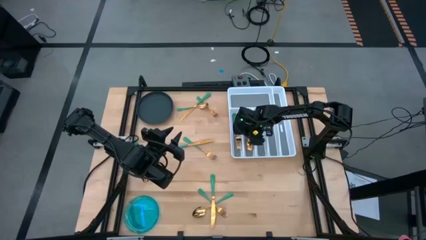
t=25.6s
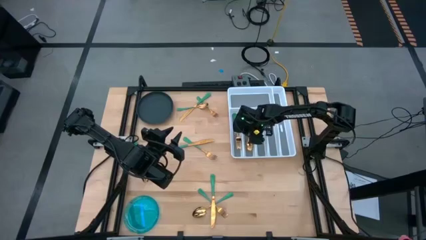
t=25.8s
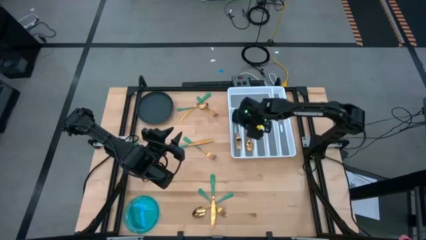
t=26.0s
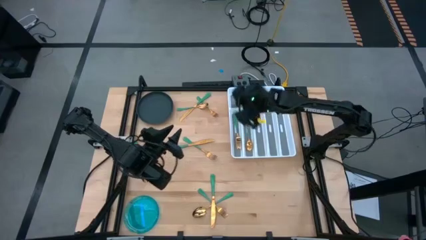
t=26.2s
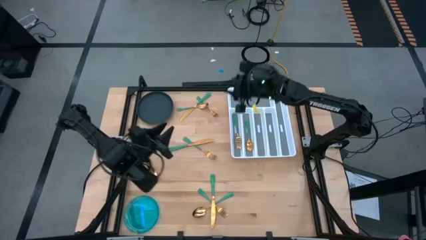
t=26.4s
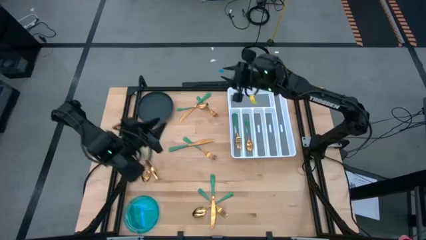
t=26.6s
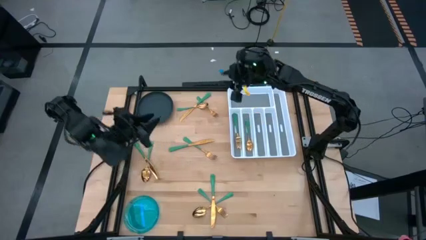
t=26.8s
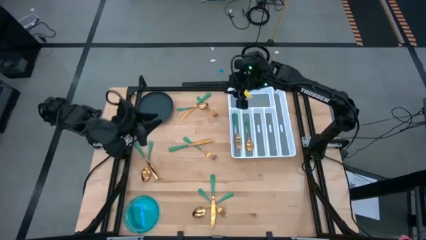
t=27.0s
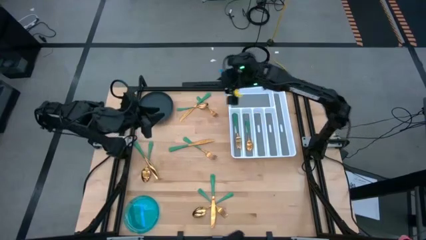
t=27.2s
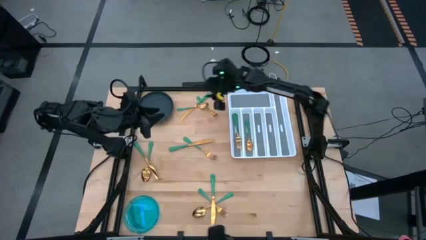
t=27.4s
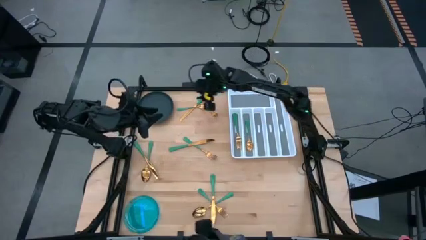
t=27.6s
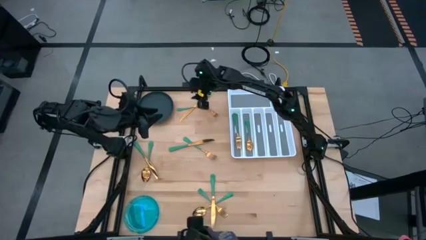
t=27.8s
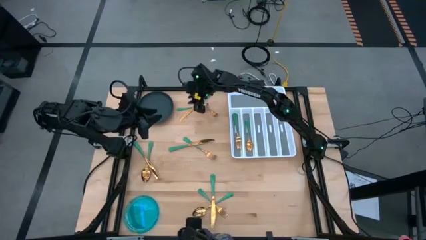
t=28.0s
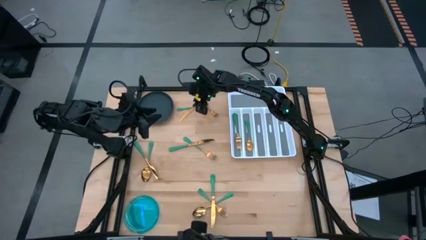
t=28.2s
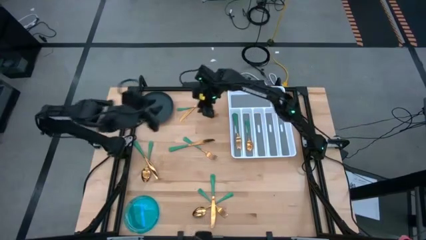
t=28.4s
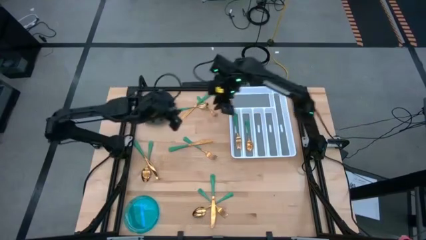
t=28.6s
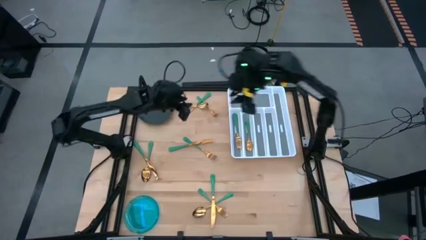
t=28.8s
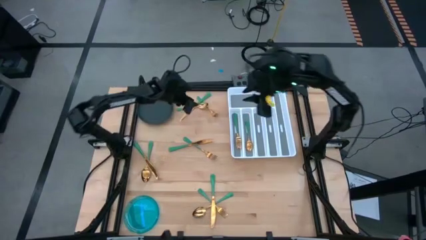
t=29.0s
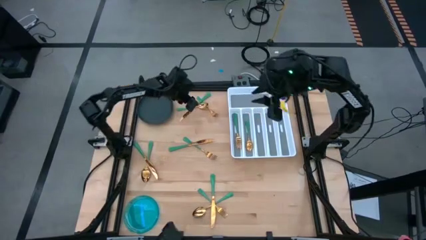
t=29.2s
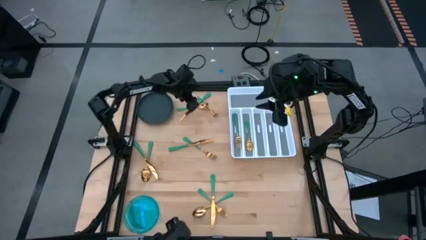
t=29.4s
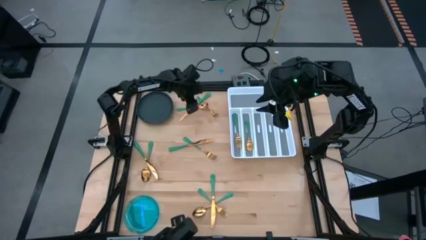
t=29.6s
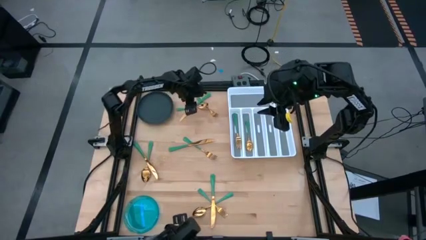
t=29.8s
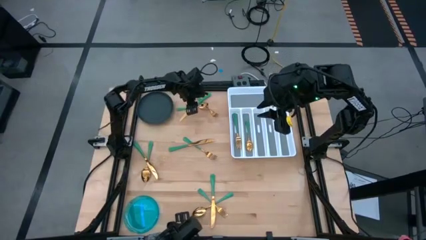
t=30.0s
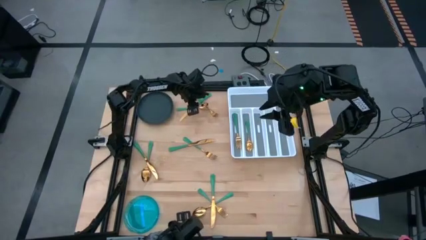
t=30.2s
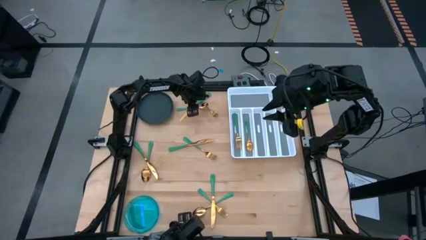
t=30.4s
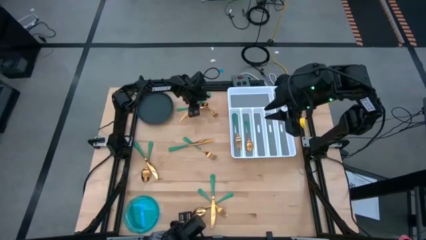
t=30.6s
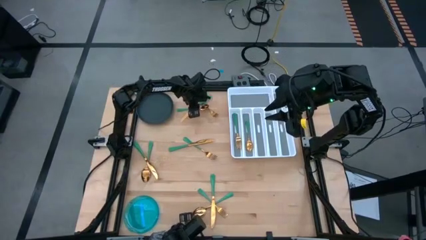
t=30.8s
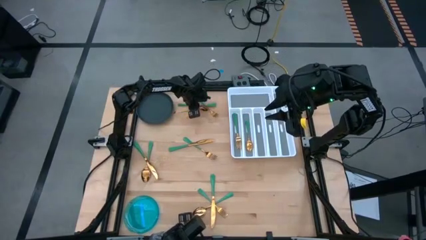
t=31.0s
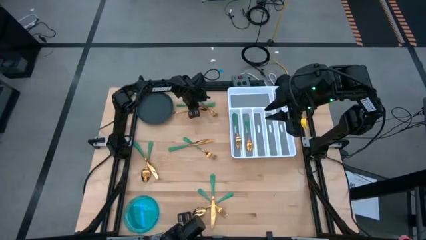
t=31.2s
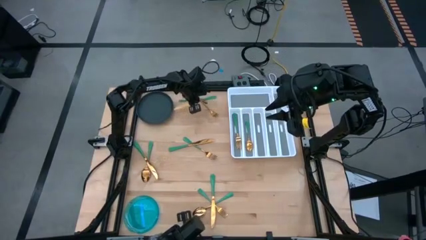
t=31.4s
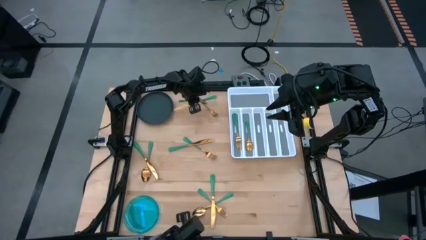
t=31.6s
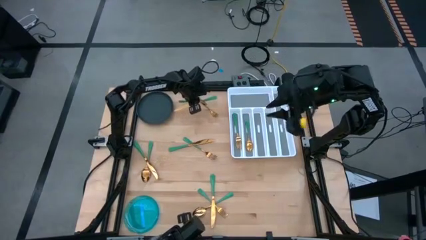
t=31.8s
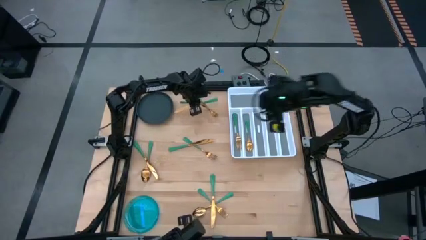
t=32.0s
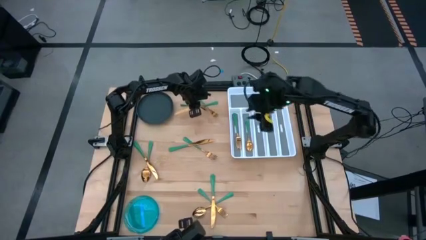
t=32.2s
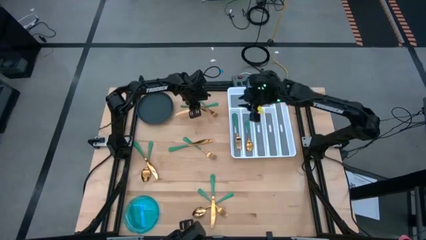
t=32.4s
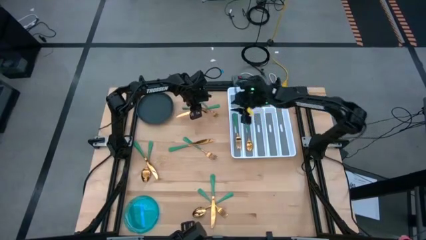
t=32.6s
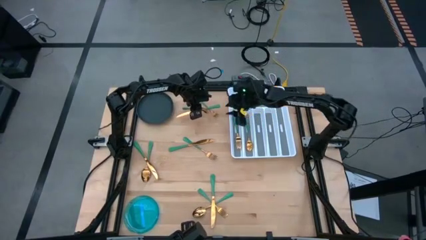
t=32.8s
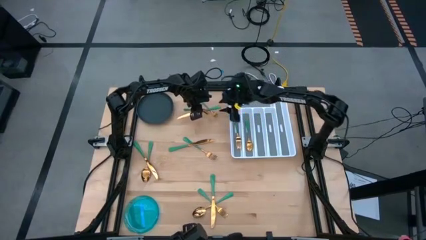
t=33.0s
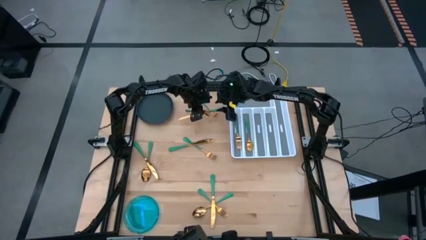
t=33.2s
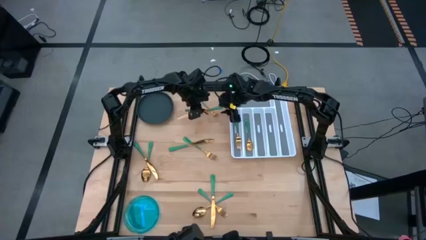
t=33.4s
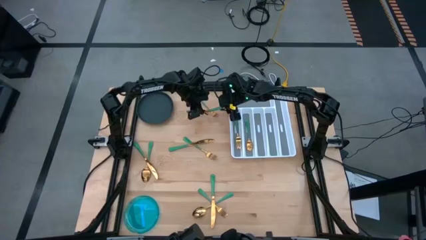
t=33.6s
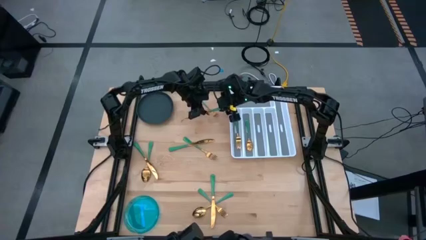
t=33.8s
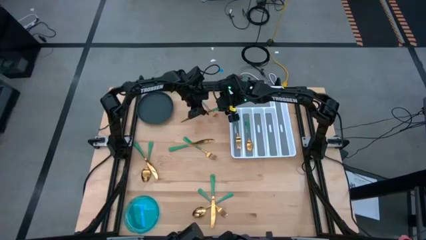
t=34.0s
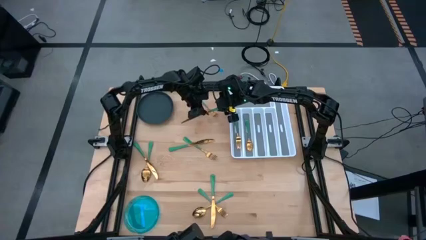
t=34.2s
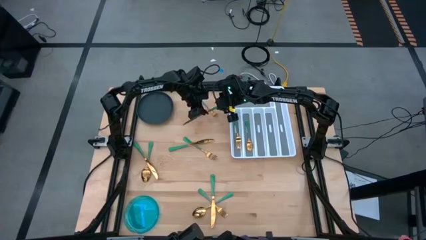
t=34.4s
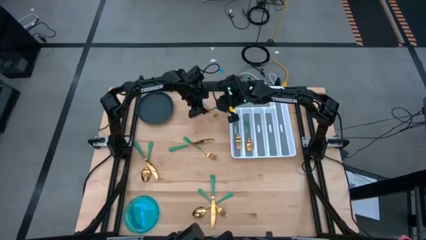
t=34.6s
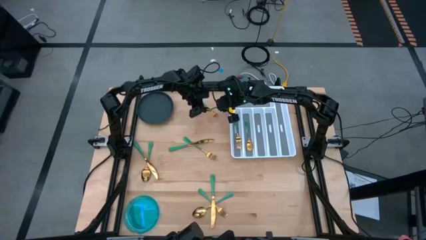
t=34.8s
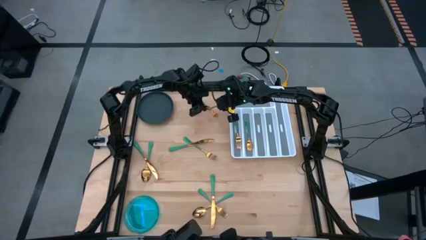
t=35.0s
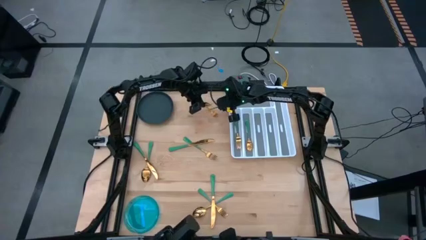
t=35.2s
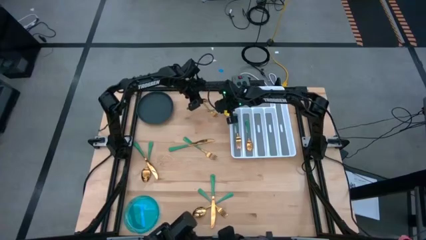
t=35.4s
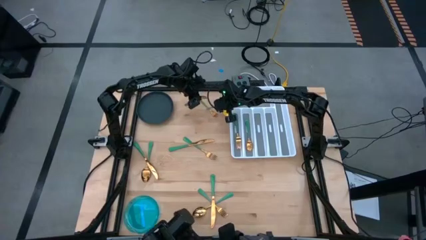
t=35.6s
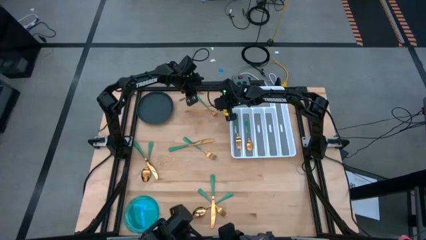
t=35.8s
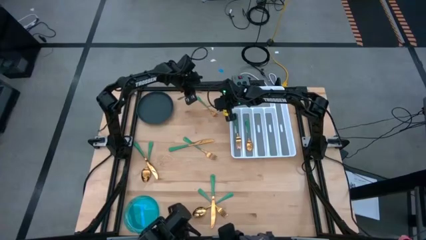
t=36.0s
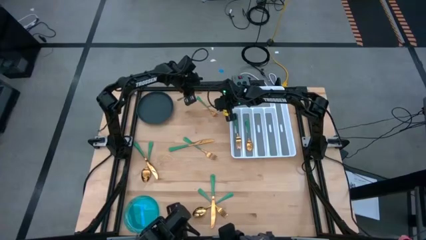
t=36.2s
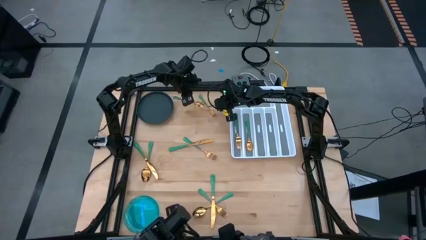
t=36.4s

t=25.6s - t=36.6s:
Task: Sort silverware
Put the green knife into the white silverware organizer

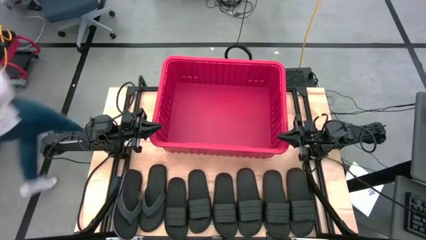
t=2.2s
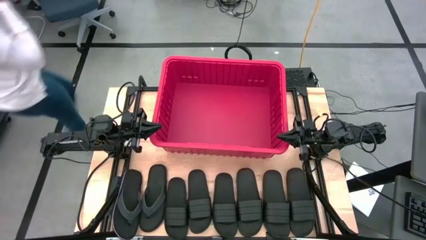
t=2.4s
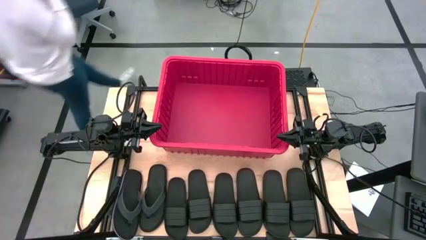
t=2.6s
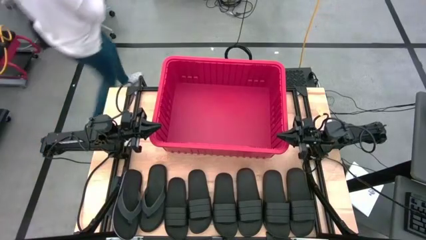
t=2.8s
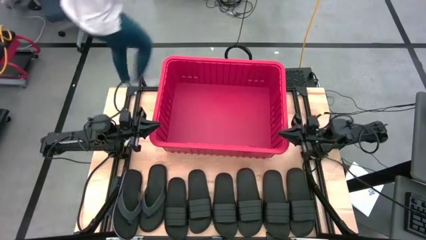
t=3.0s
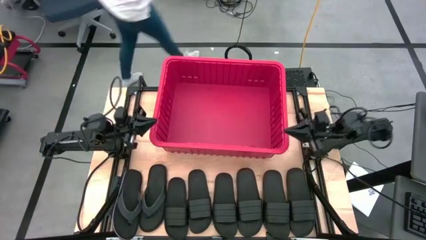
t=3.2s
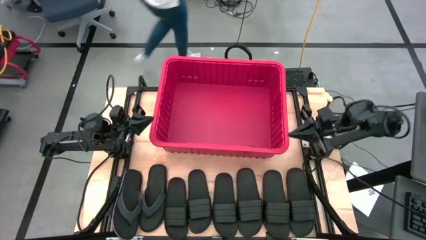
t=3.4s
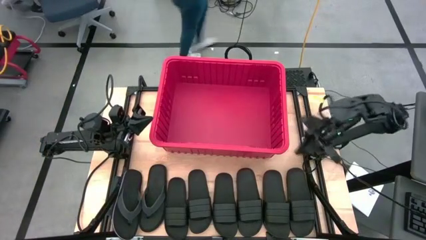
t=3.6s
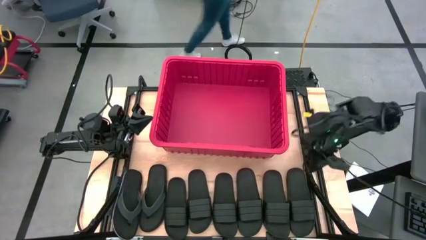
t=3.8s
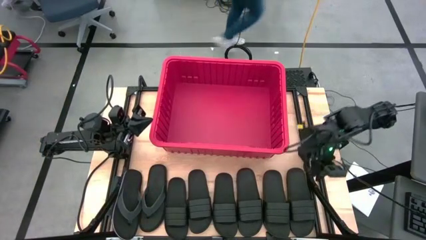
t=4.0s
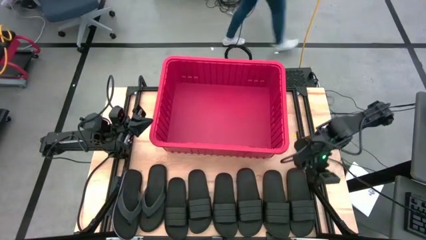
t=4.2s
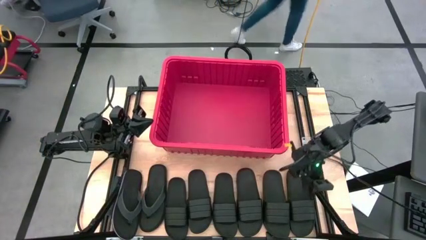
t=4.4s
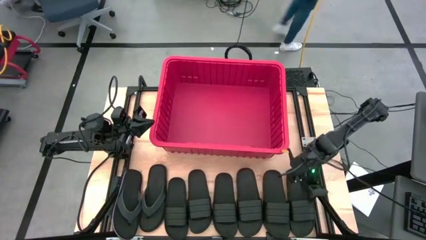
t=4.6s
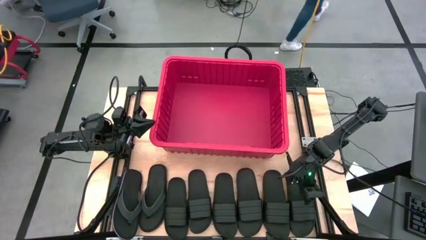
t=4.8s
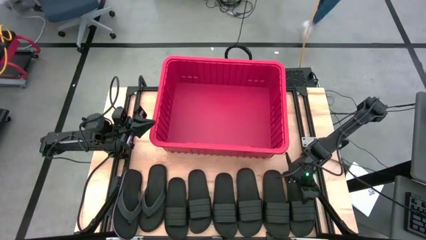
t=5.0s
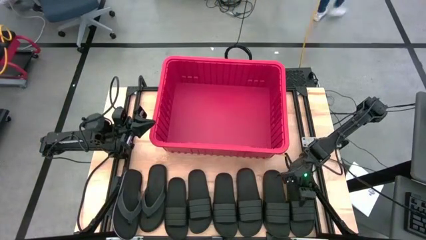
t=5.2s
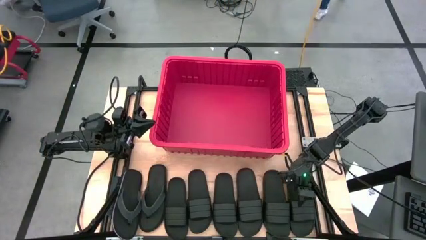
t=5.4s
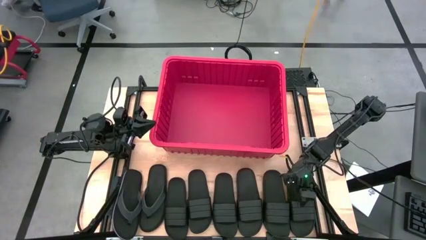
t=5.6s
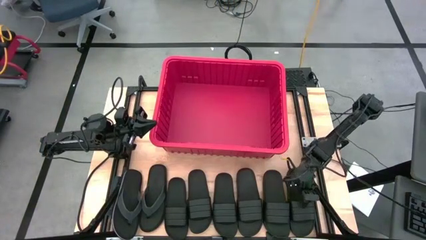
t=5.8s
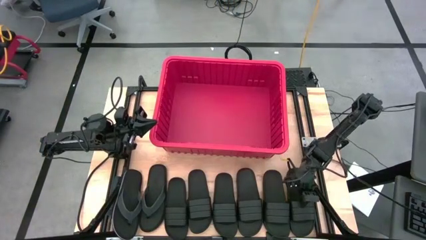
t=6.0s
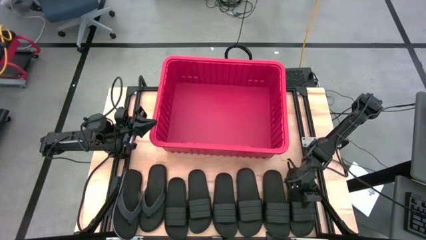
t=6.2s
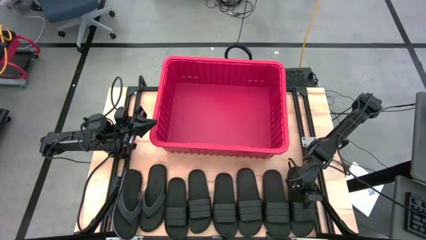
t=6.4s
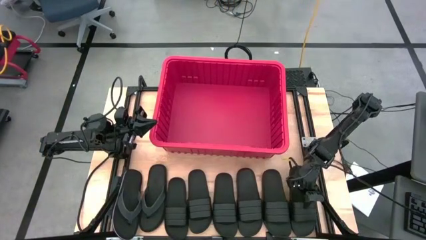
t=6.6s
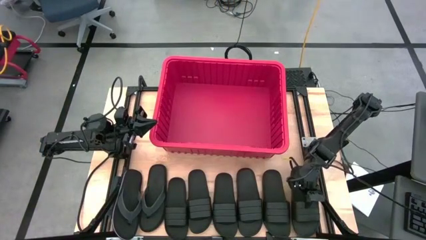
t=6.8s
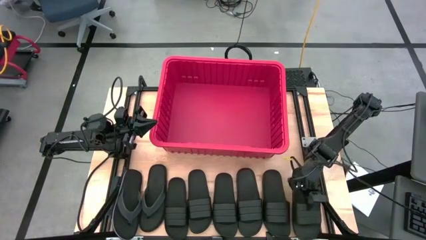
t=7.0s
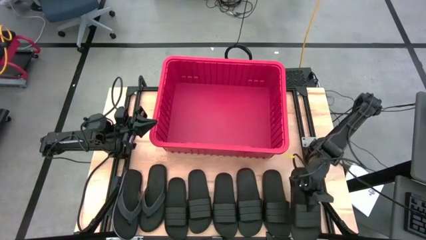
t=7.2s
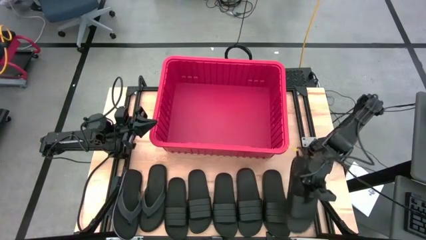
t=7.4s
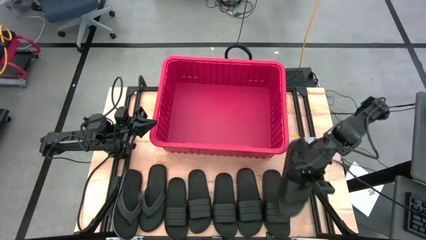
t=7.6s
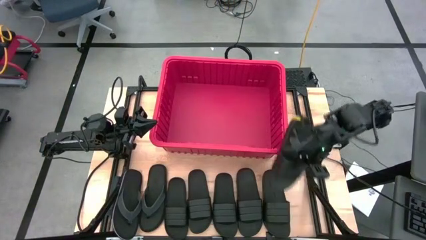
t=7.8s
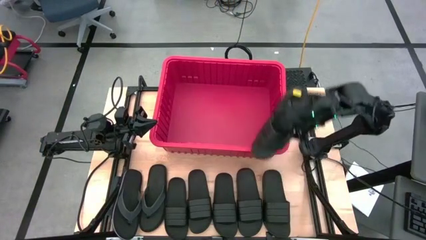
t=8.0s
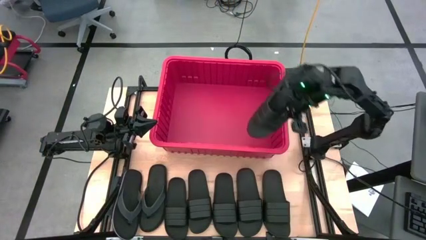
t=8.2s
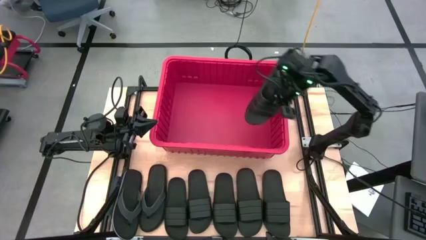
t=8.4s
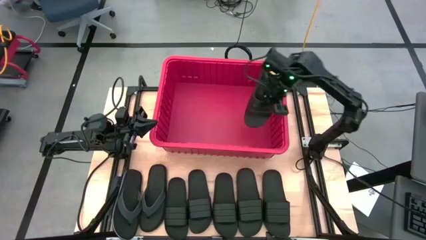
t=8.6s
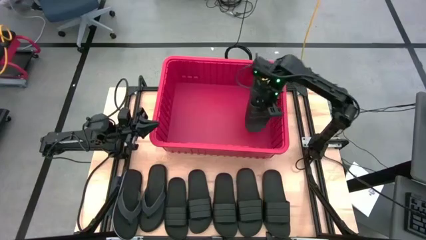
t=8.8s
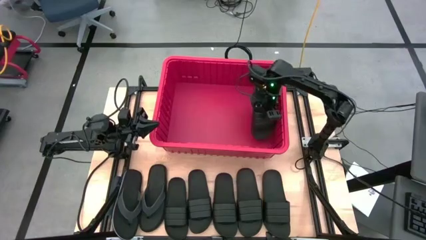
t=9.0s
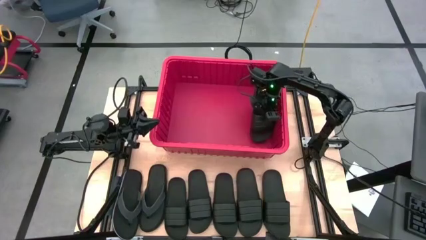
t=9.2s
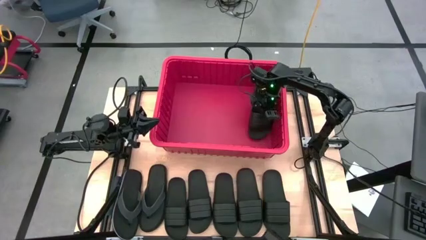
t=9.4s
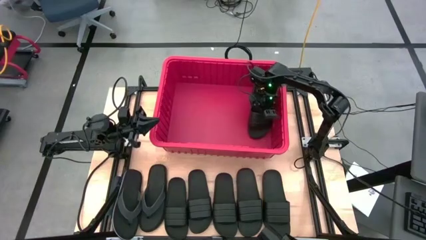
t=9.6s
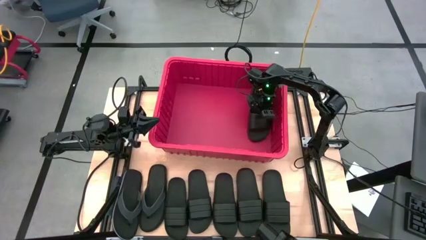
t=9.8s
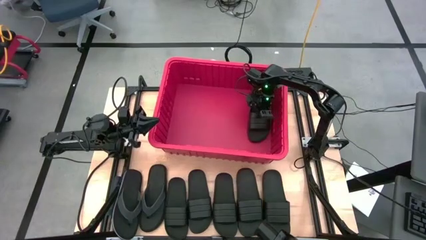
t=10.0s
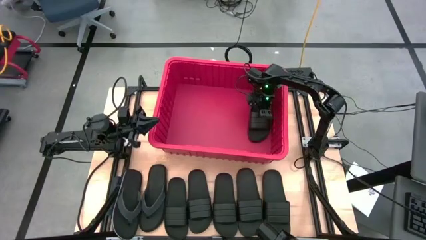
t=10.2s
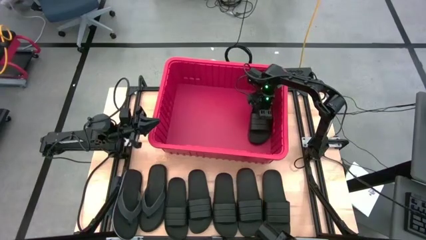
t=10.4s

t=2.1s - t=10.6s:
Task: Pick and place slides into bin
Put the black slide into the red bin
